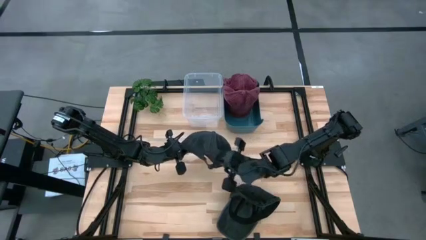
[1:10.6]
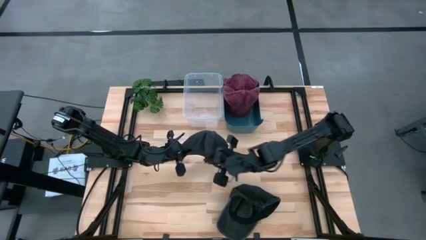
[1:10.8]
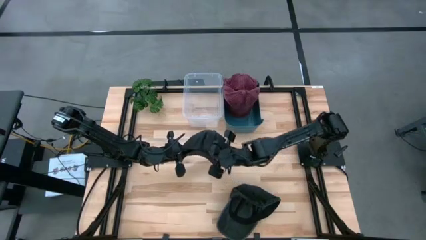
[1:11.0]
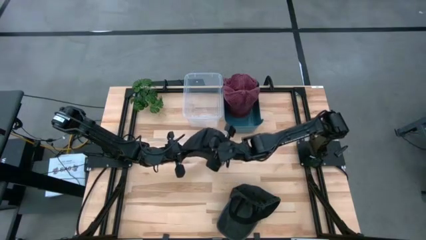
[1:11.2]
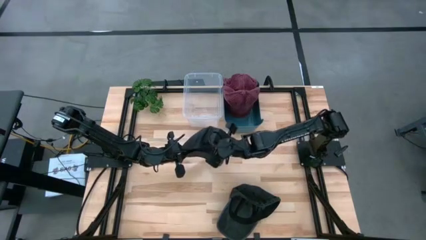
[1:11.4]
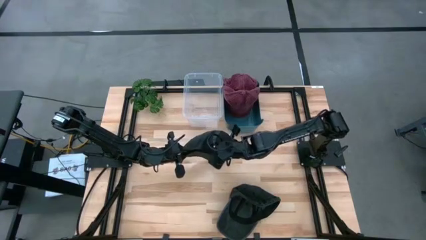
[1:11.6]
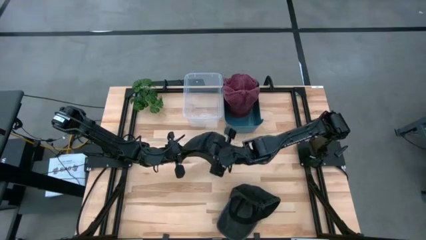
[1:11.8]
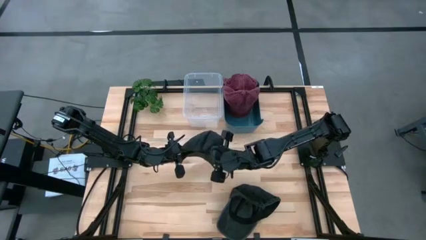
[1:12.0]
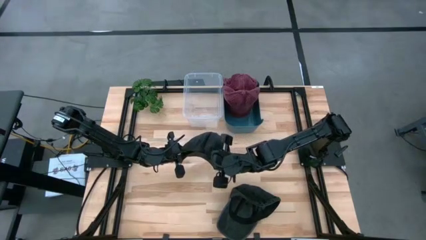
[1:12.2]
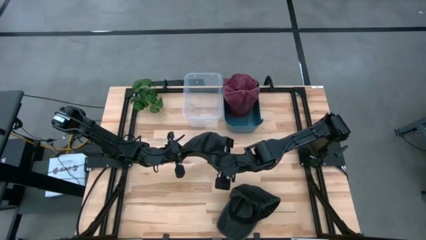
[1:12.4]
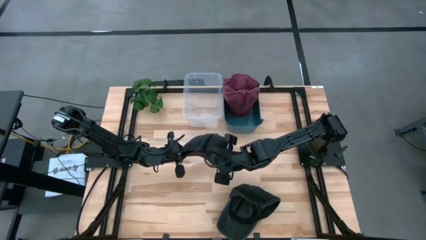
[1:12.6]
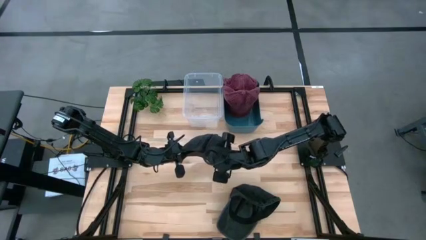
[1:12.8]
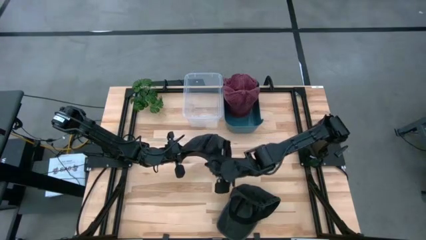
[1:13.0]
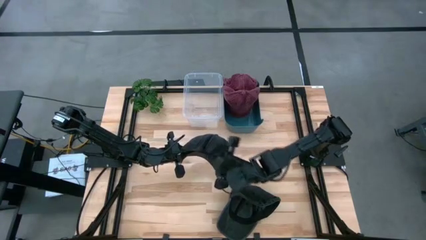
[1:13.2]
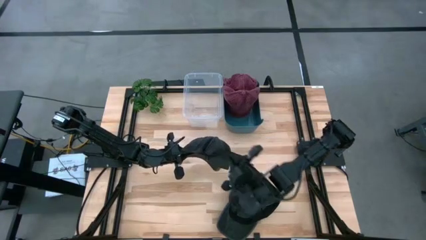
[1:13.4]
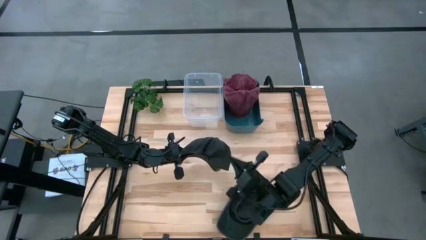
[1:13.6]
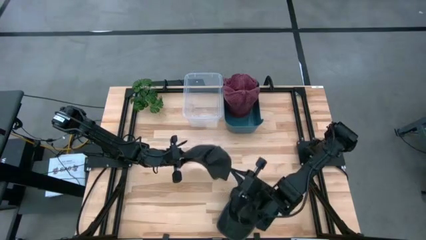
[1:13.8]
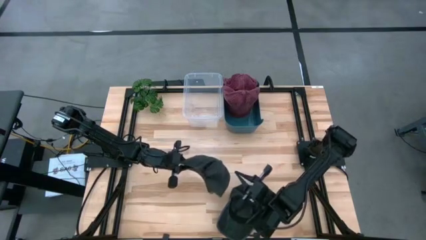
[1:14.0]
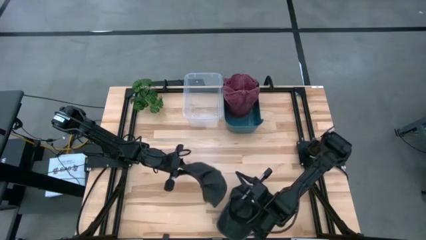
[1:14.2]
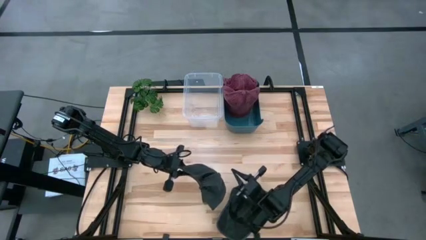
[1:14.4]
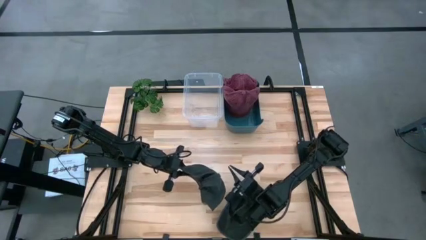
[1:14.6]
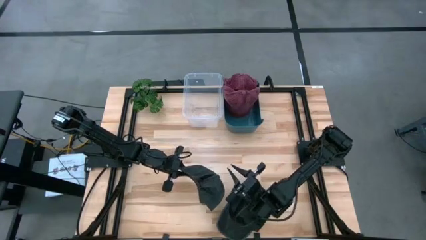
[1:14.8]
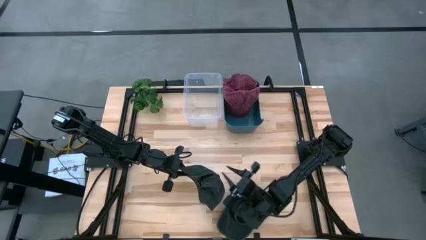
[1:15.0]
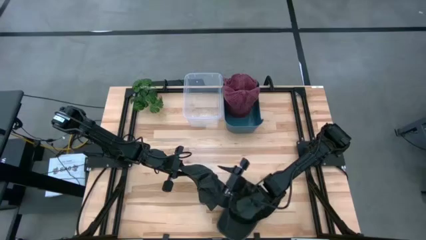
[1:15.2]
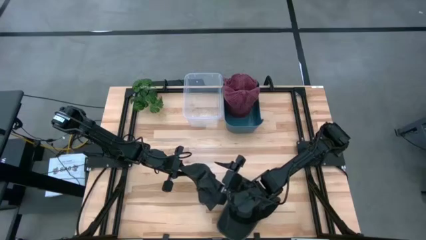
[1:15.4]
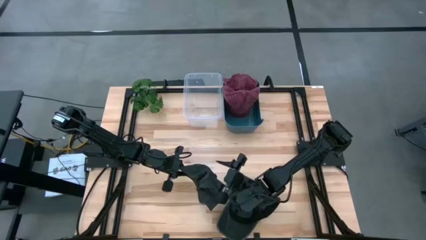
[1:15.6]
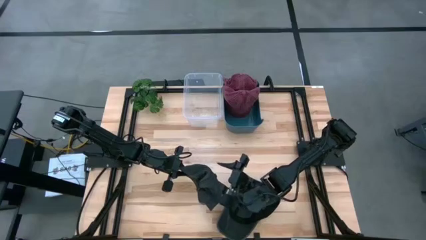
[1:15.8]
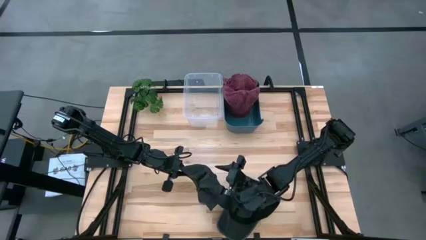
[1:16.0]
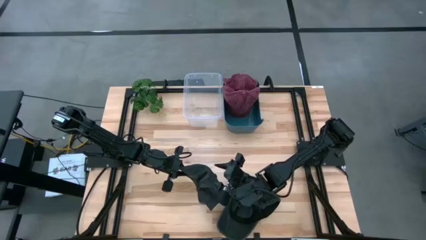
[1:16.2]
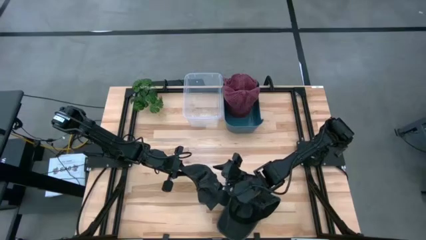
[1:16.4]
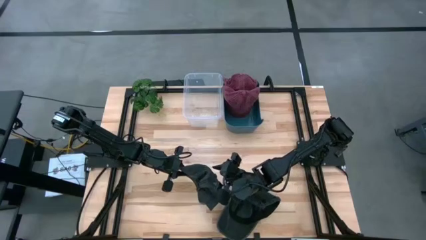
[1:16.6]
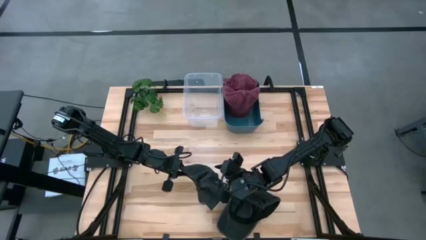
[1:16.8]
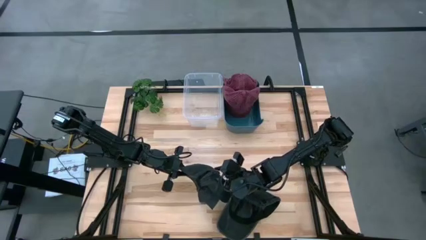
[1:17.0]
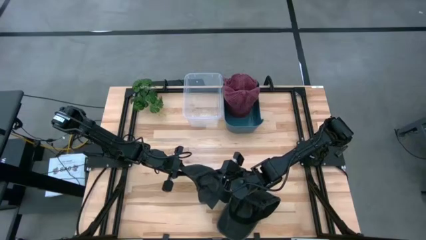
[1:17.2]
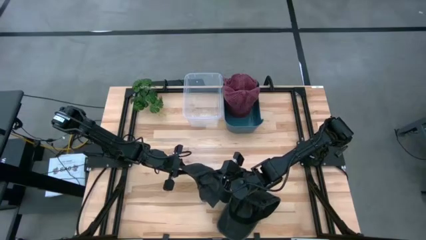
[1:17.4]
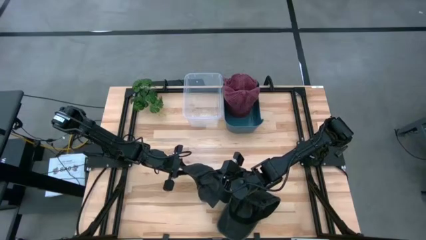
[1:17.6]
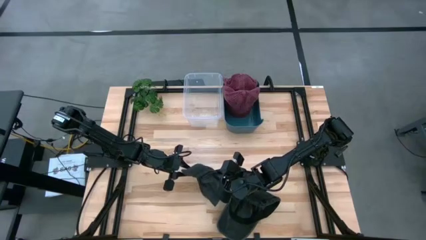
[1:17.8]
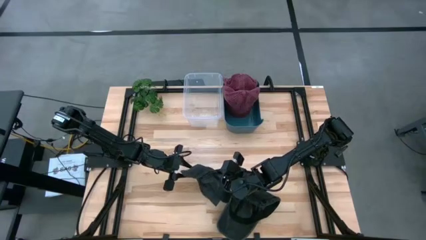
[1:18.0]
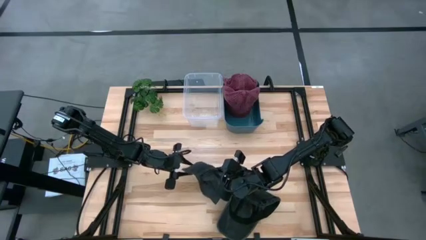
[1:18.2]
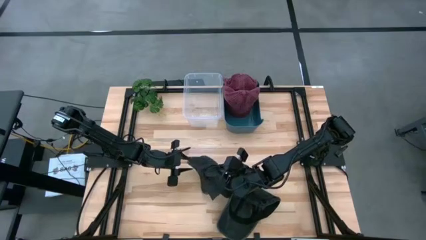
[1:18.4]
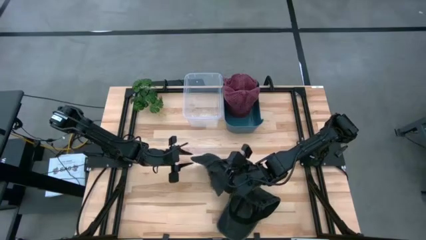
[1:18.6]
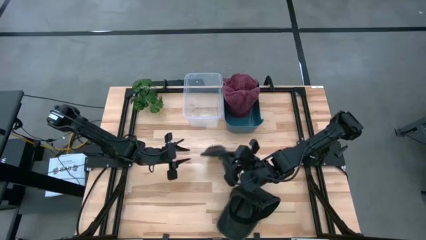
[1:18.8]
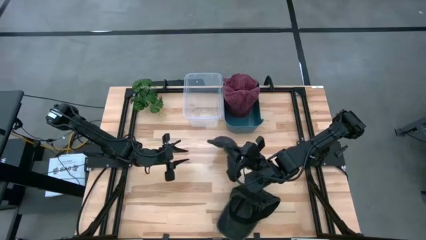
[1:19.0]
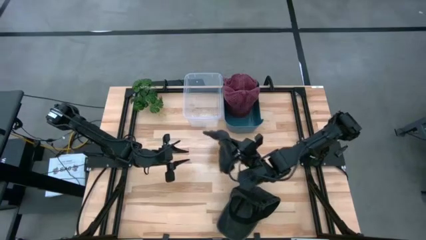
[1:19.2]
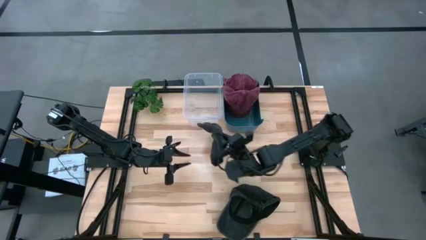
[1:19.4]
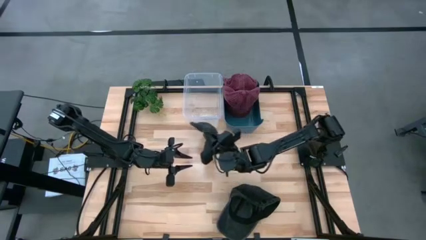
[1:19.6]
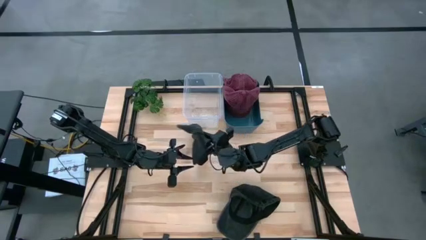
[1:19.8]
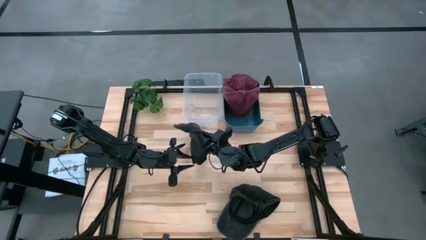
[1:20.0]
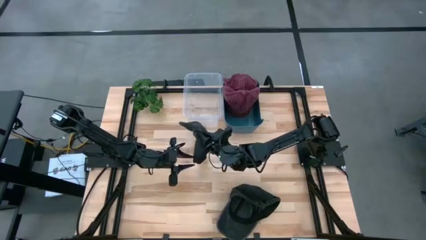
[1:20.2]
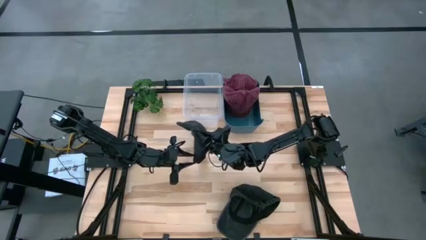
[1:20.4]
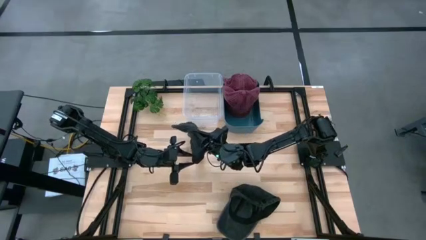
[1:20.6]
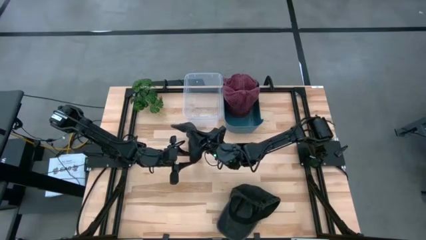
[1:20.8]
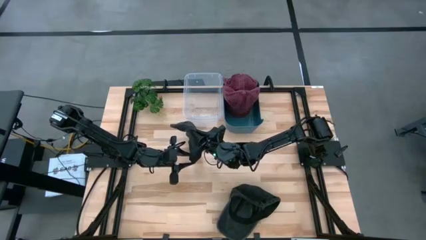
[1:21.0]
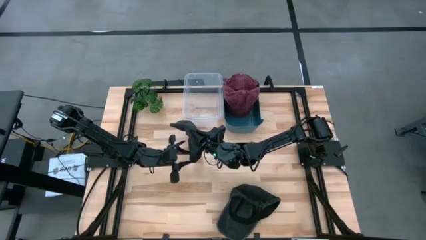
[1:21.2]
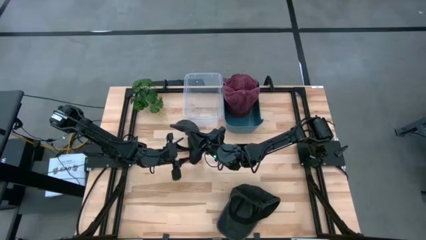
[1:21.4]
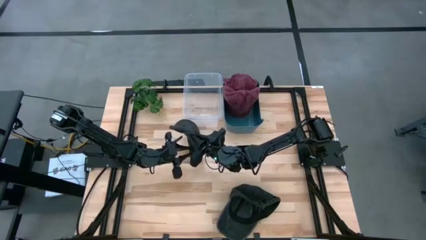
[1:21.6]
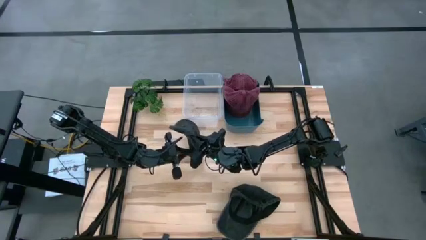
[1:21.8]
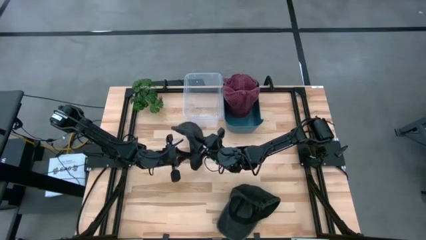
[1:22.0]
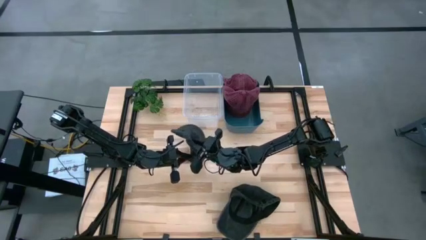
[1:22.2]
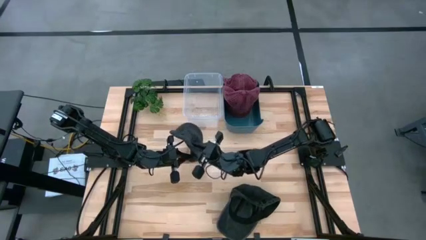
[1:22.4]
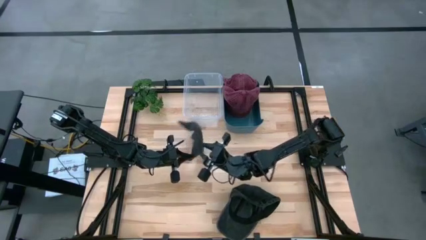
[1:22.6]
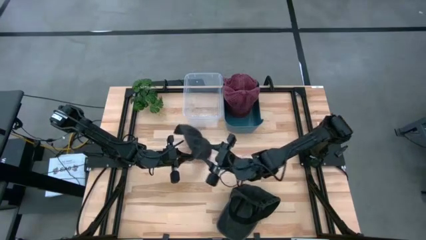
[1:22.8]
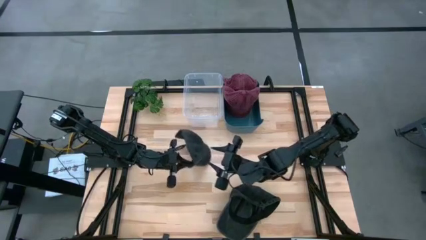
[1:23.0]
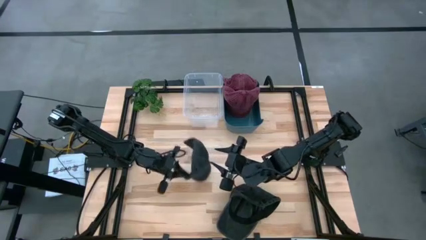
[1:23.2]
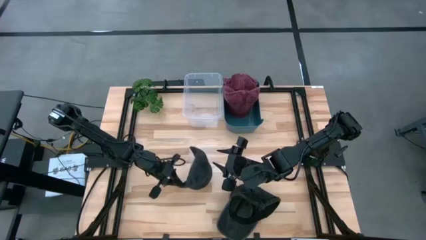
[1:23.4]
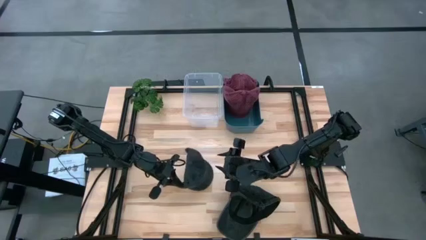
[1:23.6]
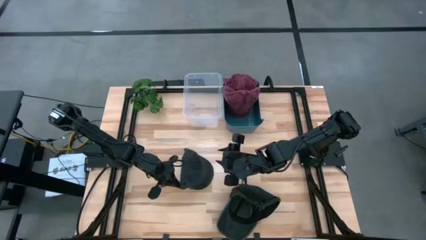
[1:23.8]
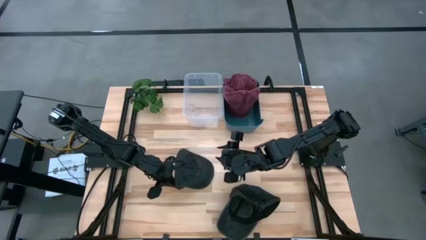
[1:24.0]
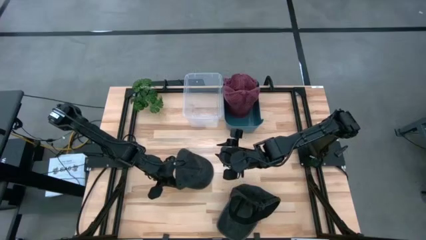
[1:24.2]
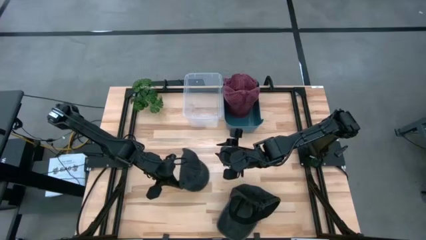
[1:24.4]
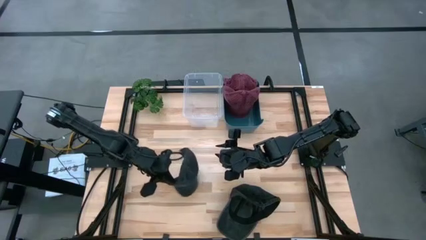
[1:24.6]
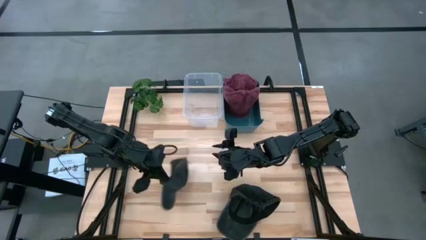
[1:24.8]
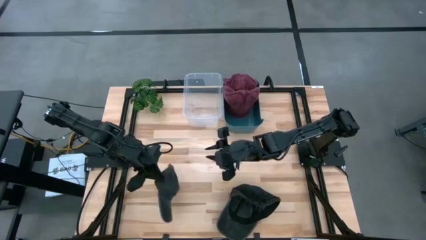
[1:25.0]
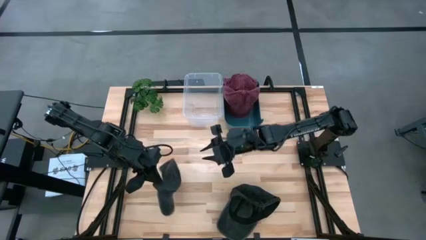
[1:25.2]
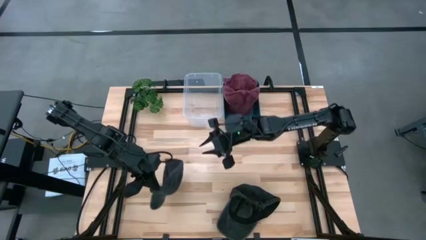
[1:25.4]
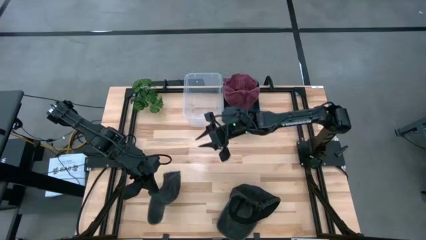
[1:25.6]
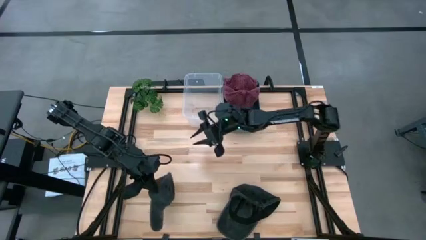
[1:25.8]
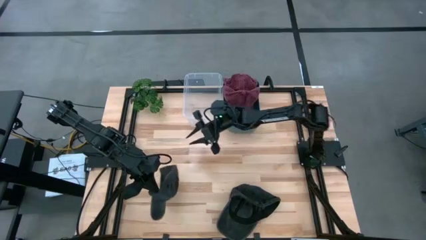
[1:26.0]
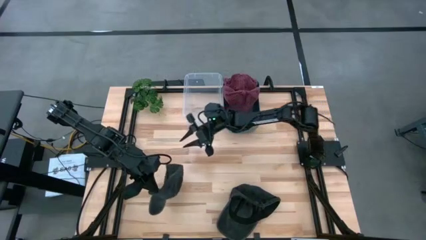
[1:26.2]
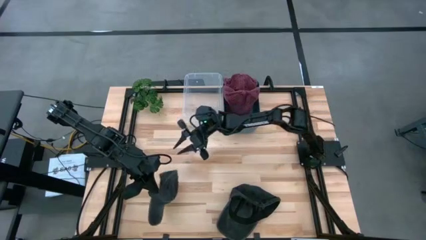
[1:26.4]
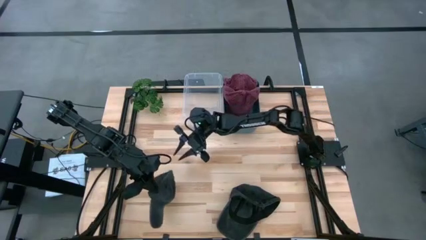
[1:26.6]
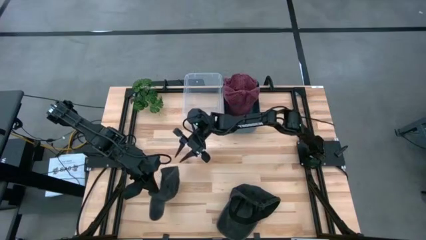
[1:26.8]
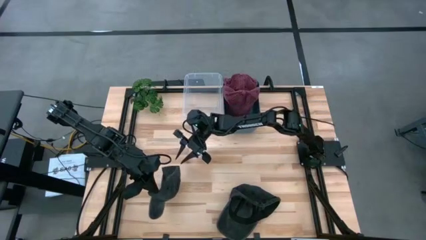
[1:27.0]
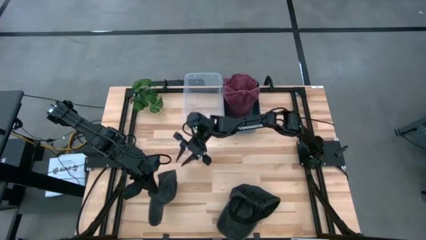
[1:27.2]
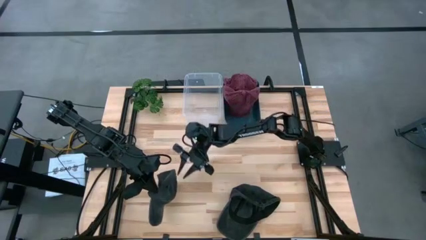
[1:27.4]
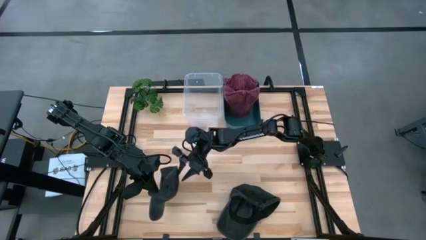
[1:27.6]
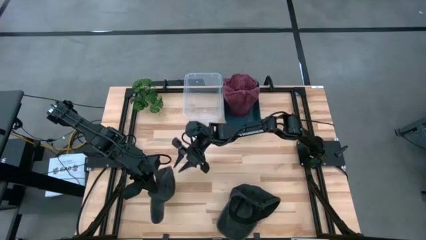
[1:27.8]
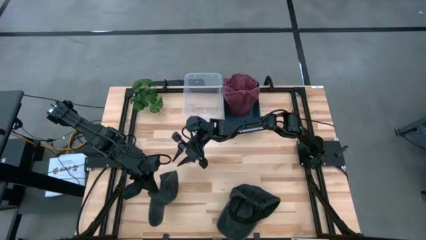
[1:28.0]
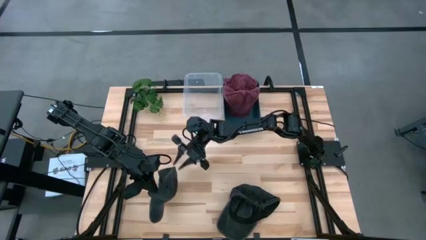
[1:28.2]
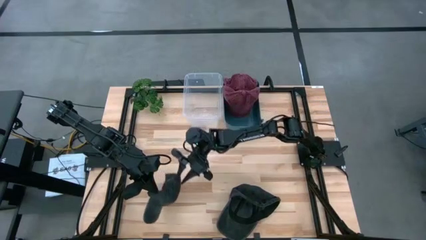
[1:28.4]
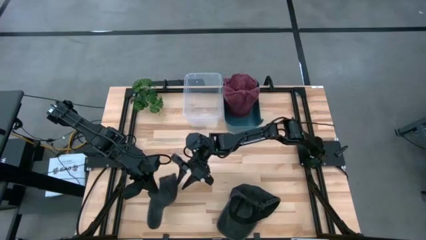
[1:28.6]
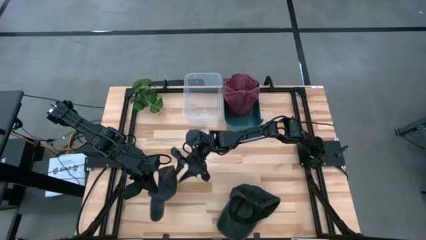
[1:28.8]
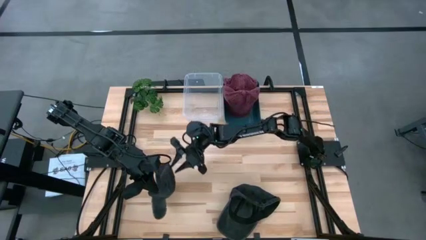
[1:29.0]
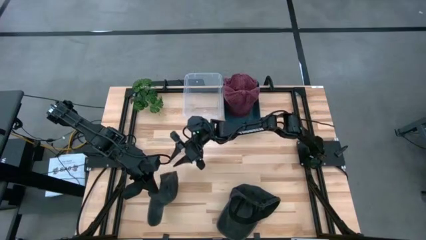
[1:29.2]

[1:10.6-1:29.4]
Task: Pick & Place hat
Put the left black cap into the transparent bin
